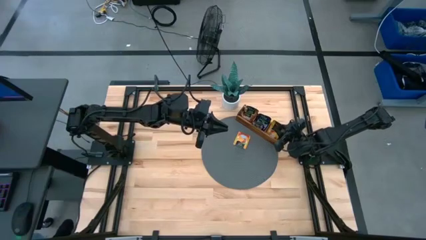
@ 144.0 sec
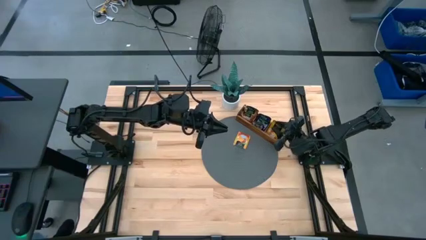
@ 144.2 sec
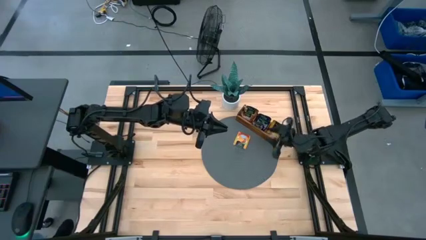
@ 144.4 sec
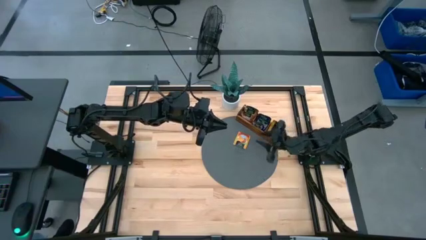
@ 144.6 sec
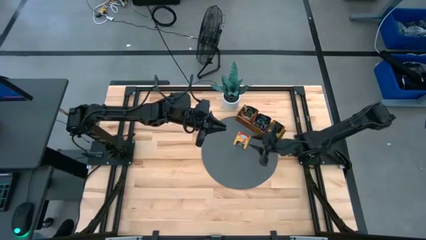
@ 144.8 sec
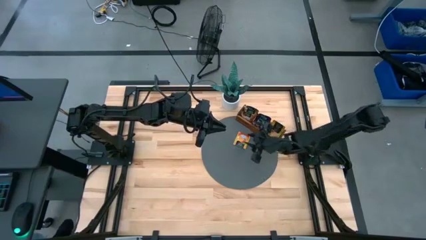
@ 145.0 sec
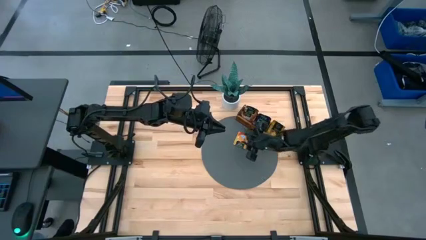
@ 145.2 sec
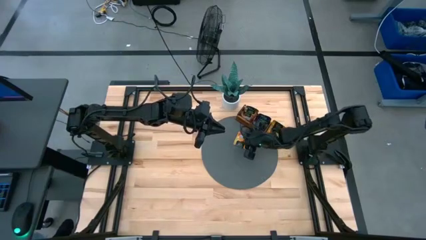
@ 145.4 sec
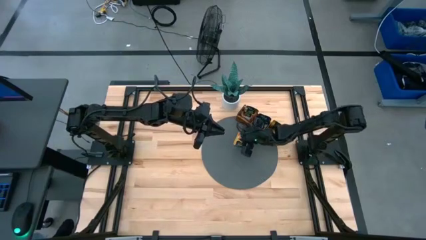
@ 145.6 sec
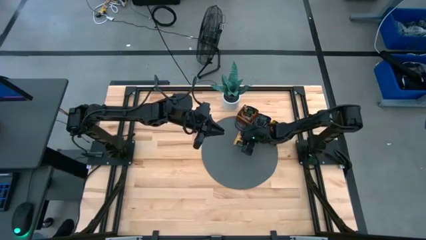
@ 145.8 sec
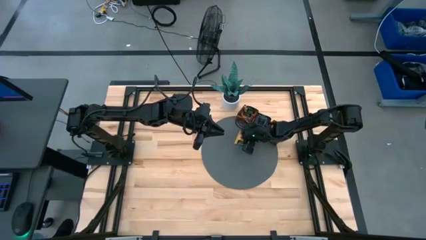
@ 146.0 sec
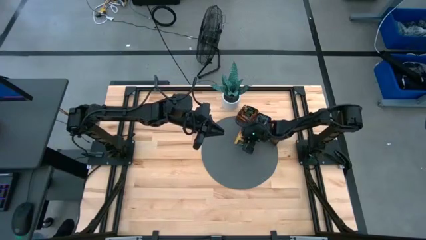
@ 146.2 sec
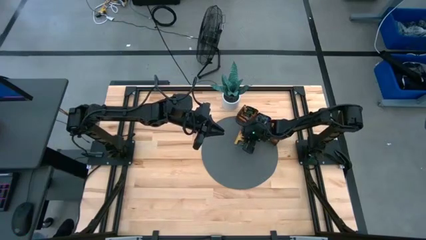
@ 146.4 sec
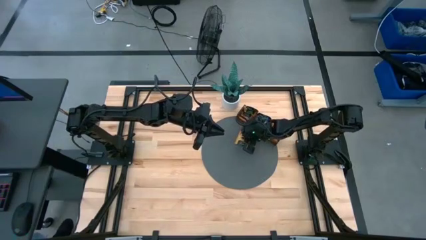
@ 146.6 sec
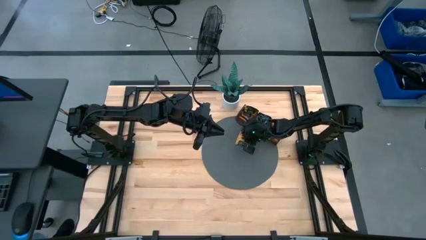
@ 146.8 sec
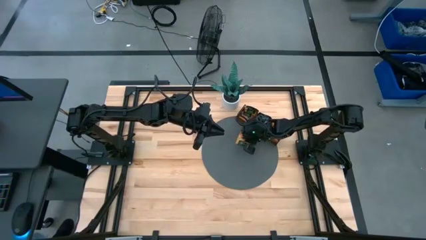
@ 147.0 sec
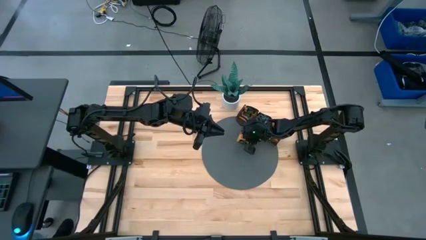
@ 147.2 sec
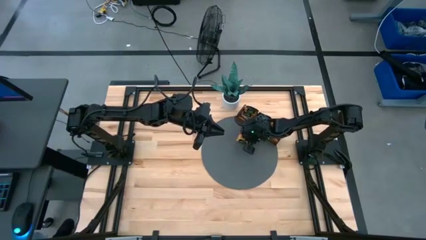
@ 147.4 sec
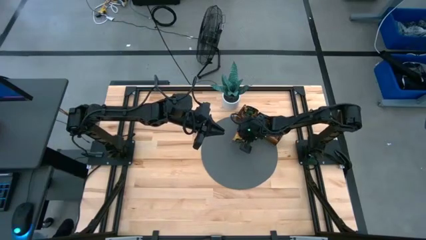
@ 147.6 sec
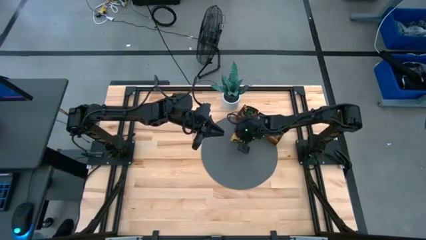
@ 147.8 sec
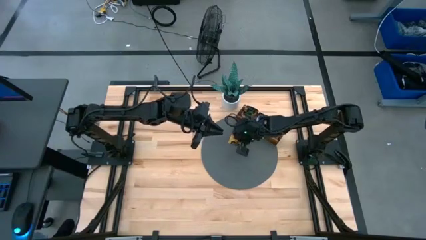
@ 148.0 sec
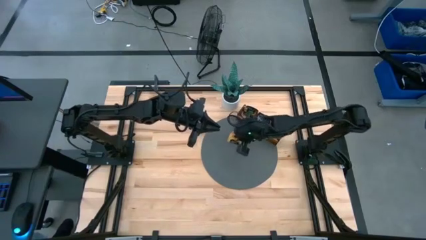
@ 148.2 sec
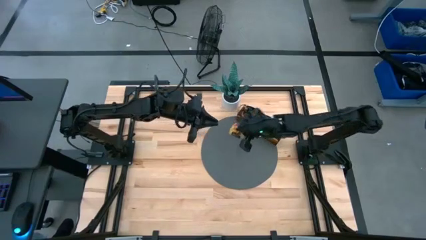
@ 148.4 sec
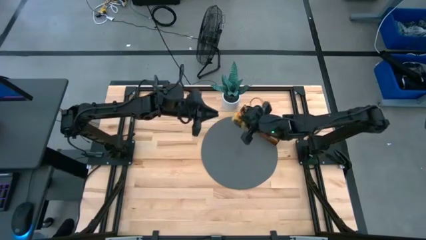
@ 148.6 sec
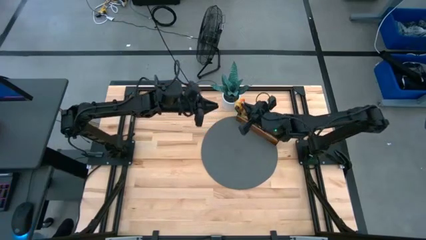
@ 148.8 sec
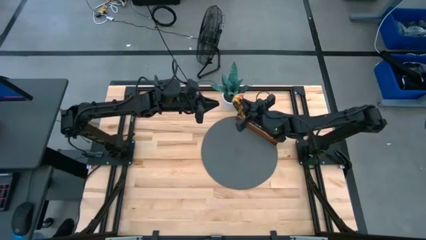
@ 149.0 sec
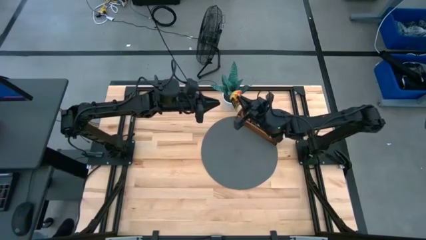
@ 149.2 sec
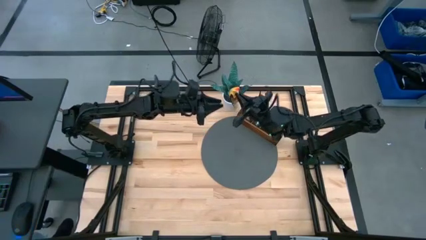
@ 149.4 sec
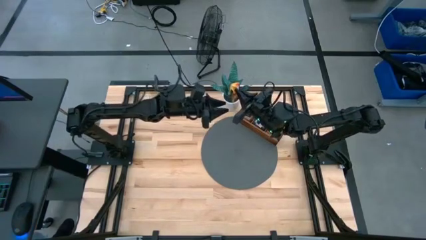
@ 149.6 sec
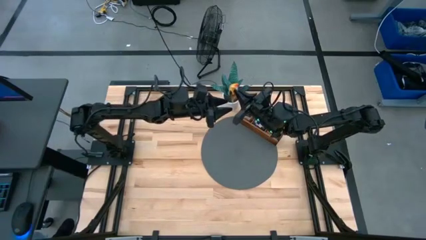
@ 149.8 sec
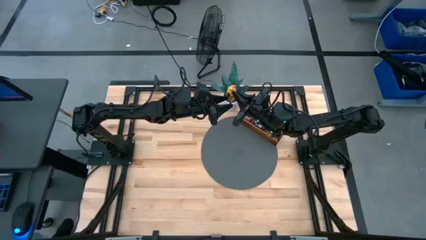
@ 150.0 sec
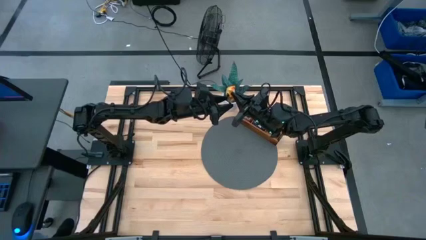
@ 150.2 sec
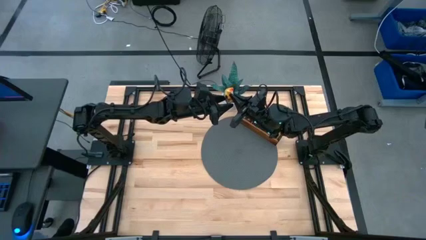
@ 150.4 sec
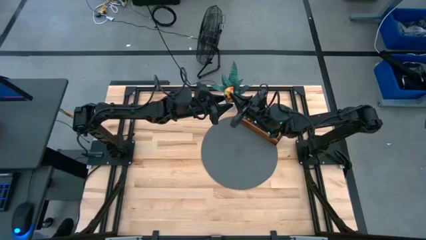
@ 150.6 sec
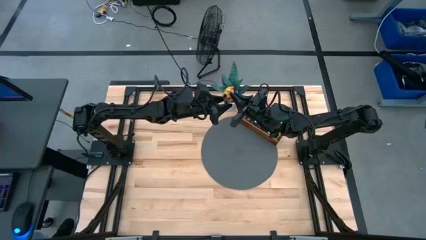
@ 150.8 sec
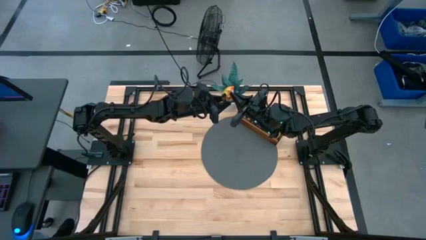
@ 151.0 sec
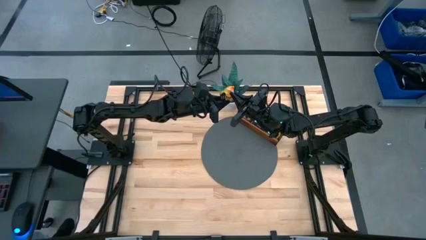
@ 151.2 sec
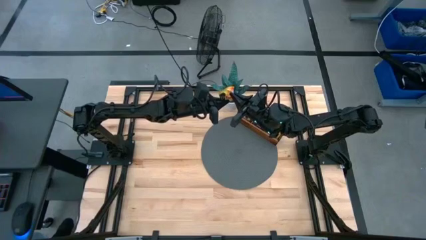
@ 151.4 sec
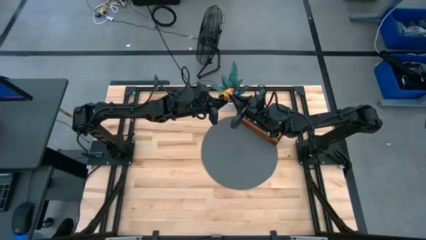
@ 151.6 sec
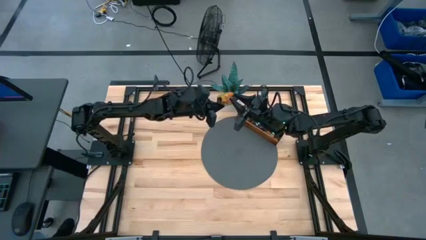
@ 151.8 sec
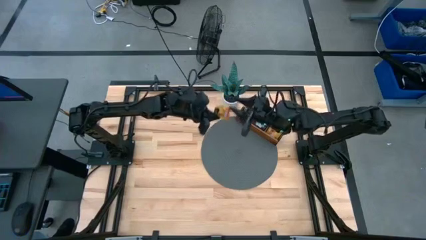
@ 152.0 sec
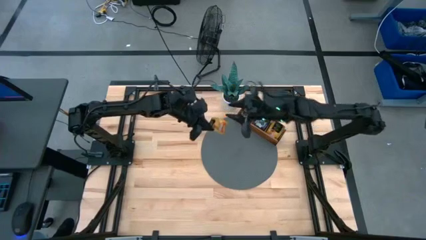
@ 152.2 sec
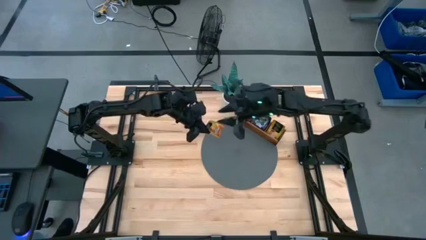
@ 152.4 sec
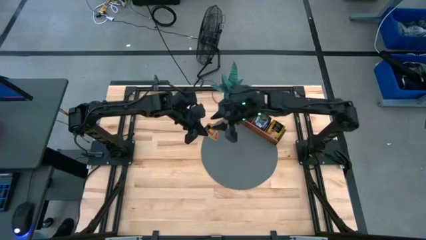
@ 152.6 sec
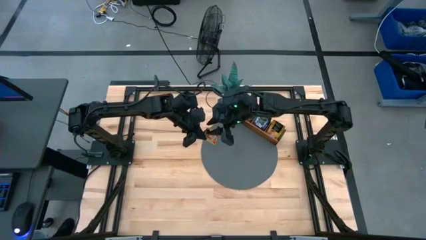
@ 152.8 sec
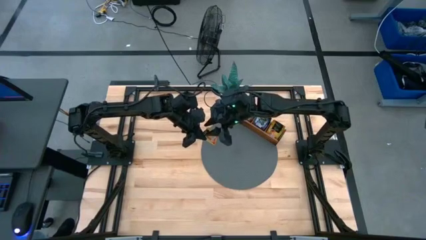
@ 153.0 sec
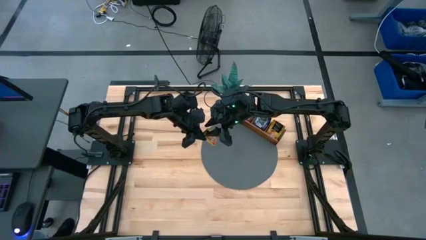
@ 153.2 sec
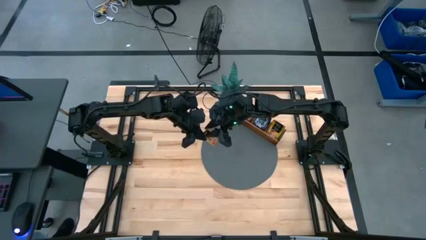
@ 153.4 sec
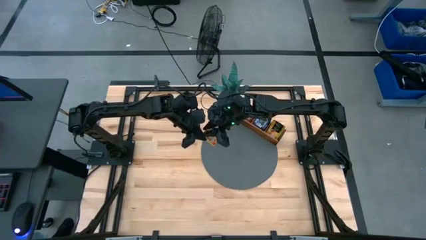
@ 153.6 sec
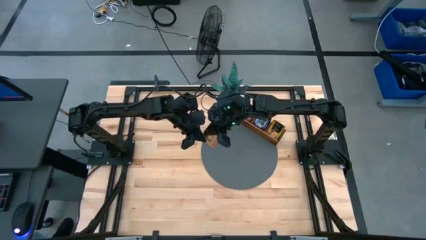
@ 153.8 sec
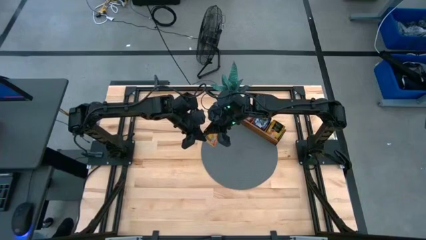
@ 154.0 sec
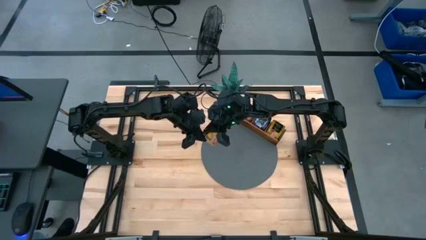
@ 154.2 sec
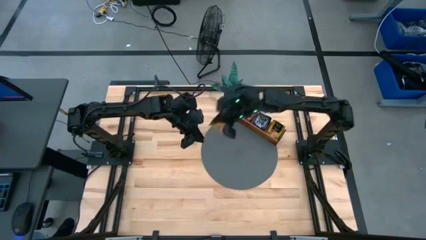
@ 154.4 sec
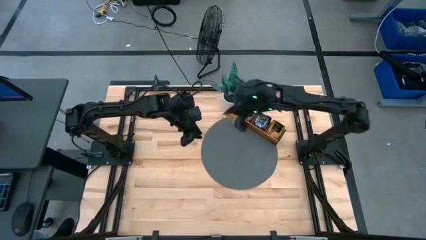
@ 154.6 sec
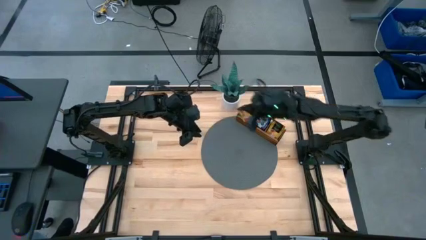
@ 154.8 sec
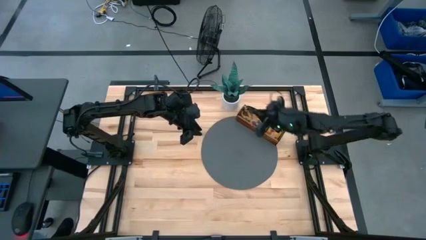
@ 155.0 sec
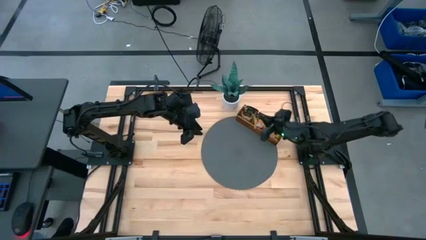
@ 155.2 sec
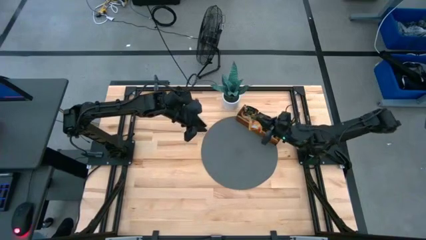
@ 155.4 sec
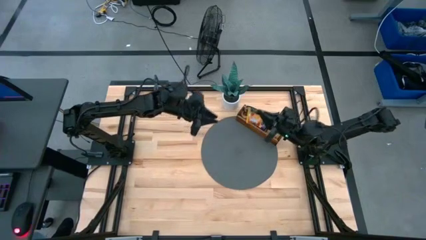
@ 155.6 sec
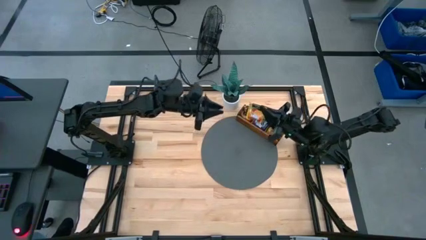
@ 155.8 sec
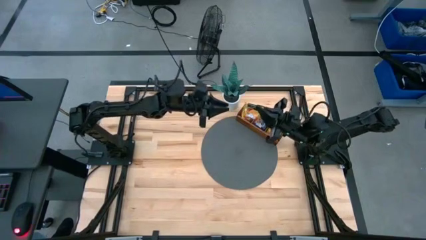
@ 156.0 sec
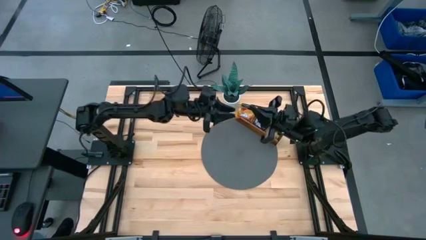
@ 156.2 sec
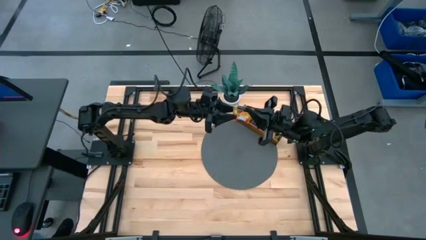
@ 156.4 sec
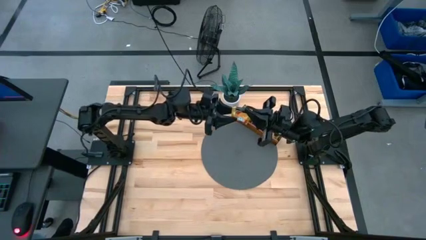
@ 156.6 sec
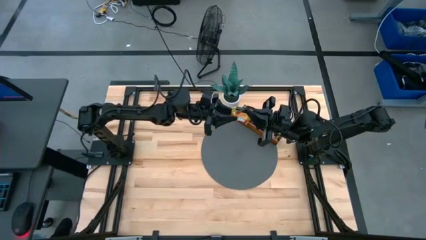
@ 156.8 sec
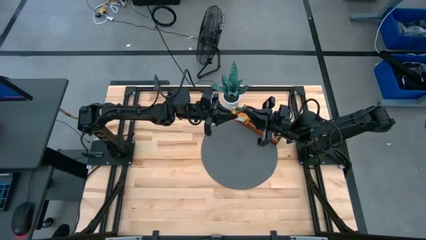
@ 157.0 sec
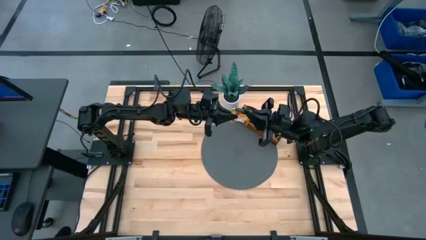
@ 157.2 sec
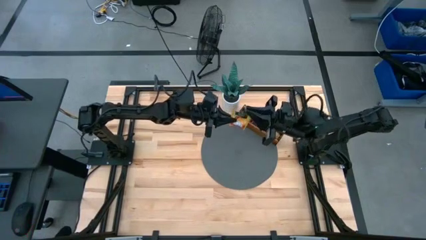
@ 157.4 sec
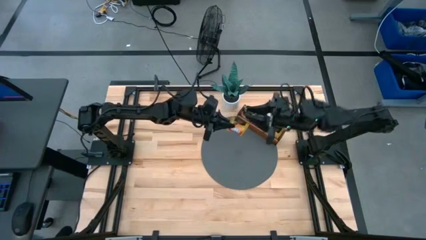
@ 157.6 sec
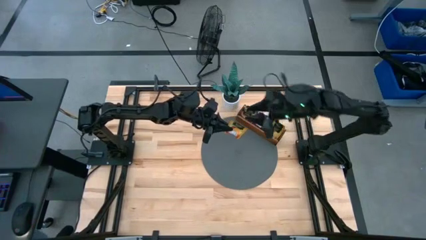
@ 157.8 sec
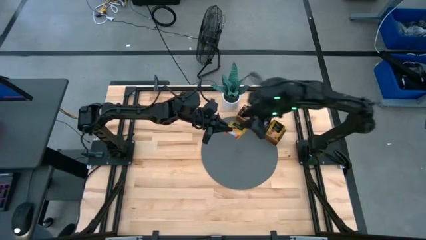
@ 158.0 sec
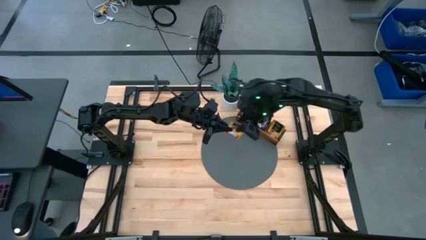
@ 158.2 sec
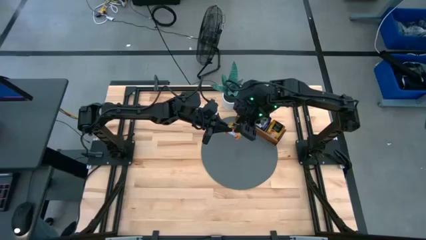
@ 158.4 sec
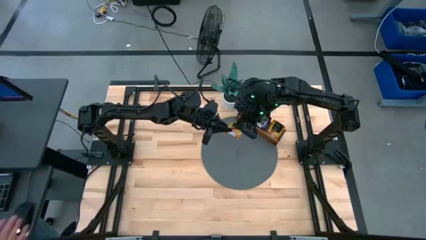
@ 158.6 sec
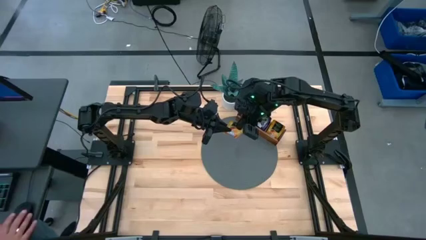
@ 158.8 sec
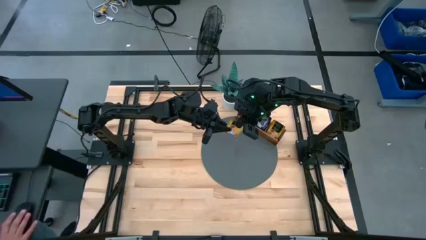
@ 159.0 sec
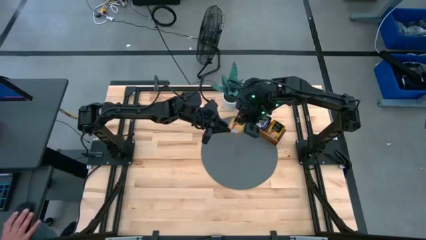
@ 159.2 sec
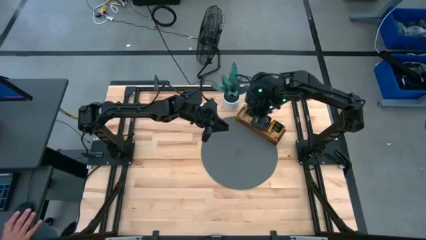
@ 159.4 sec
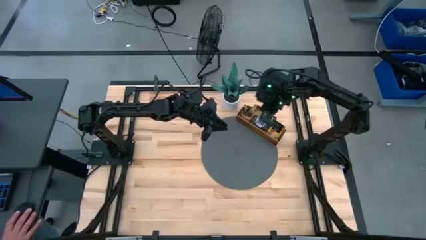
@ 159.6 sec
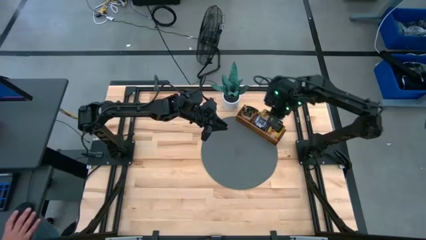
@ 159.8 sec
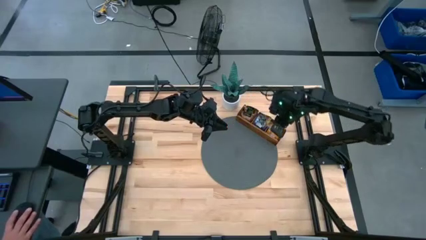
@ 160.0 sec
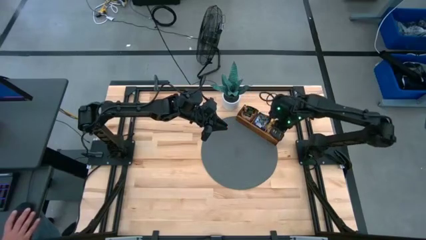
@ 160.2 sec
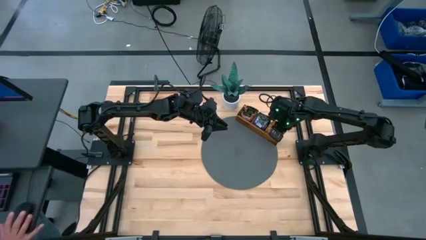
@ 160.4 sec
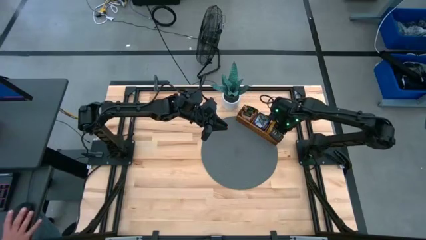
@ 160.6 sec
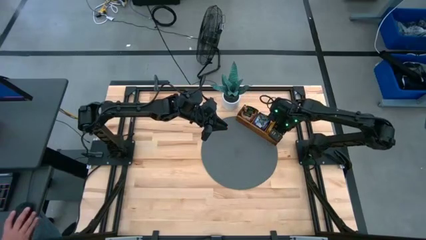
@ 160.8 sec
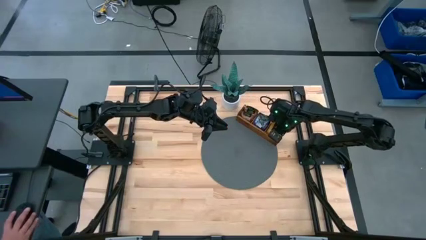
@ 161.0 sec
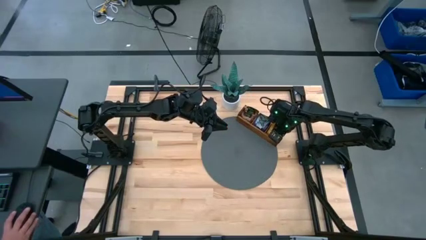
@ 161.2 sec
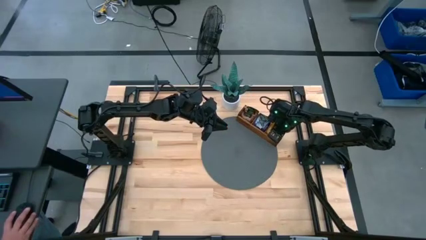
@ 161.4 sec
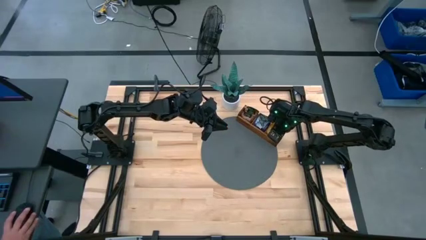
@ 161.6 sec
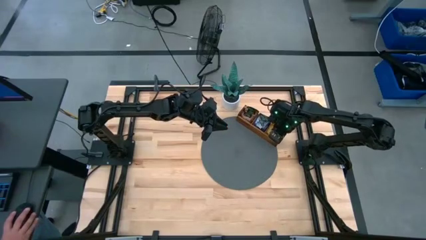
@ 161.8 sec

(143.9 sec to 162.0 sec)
Task: Pick & Place Tea
Put the yellow tea bag into the wooden organizer
